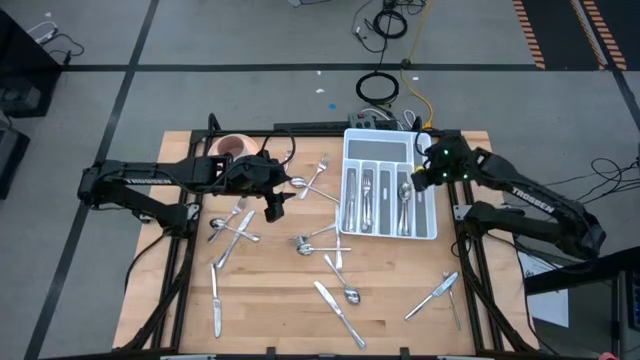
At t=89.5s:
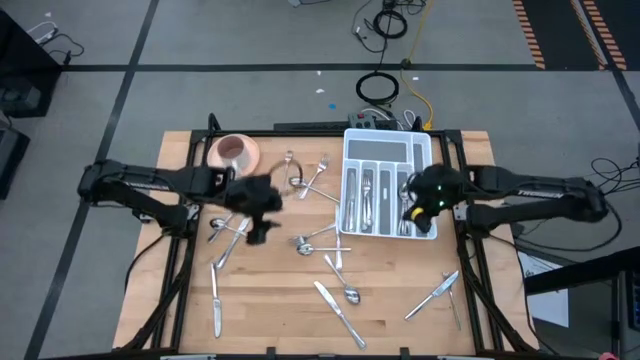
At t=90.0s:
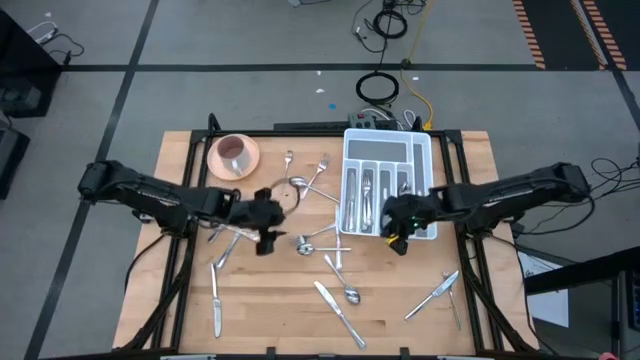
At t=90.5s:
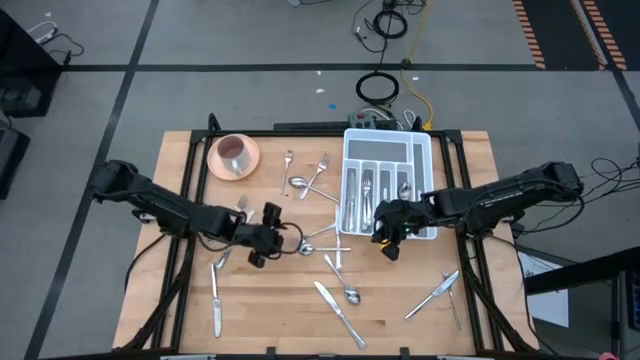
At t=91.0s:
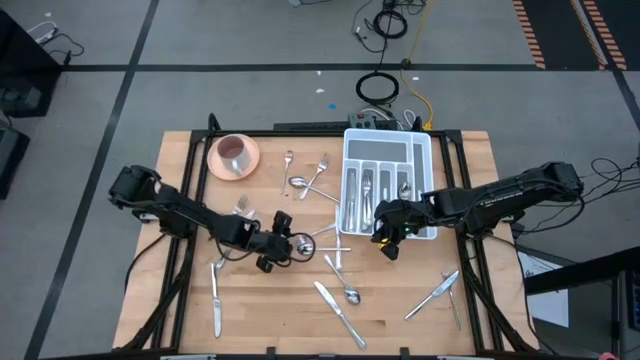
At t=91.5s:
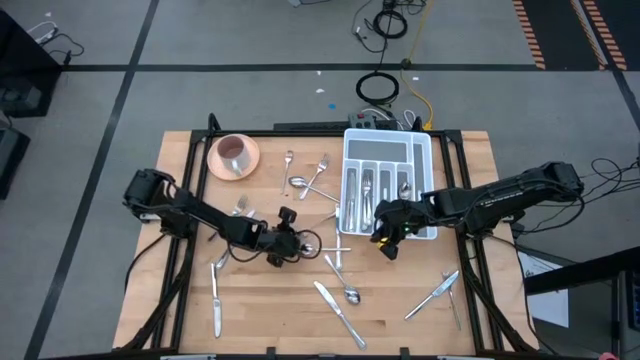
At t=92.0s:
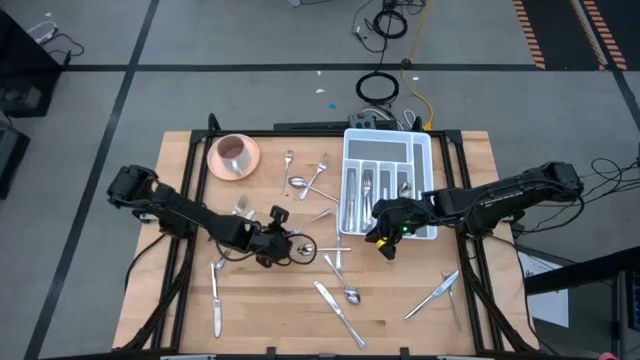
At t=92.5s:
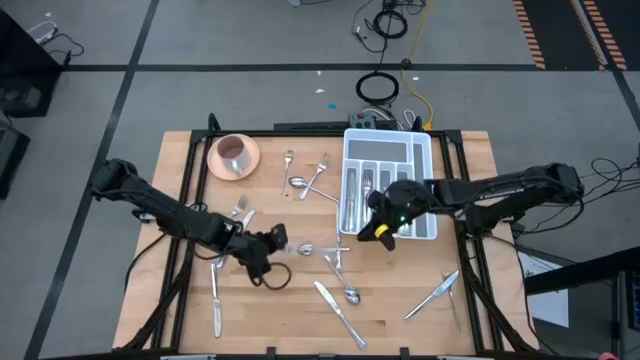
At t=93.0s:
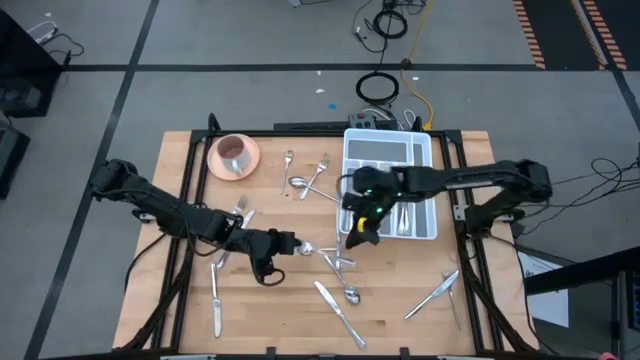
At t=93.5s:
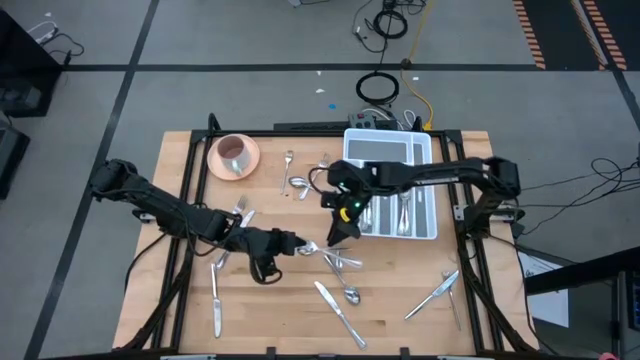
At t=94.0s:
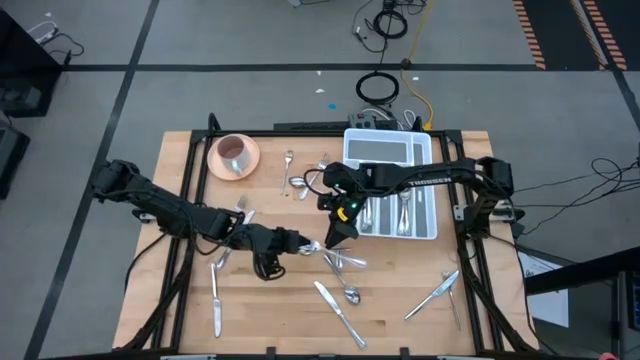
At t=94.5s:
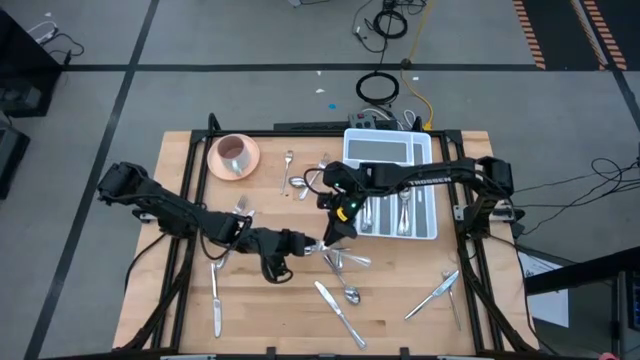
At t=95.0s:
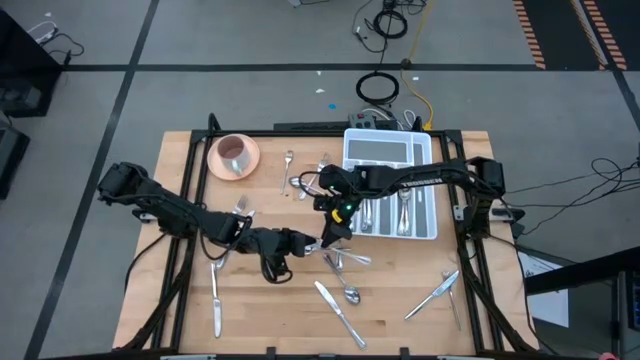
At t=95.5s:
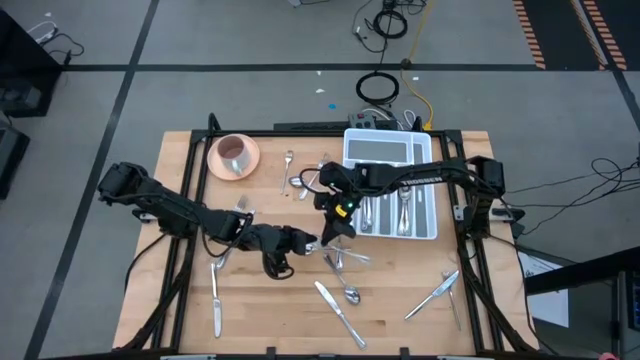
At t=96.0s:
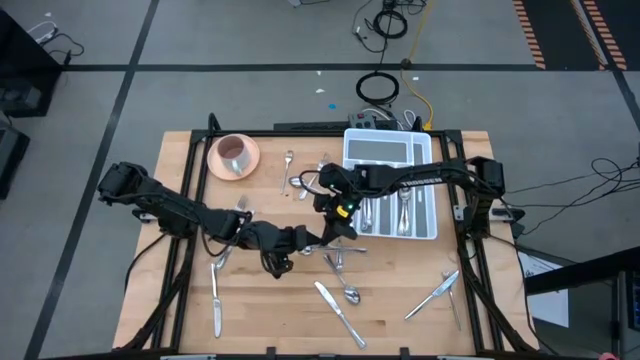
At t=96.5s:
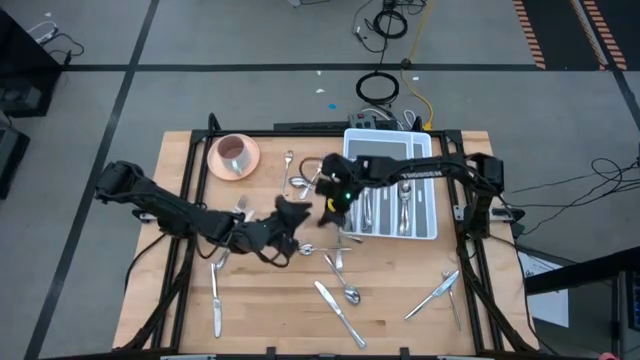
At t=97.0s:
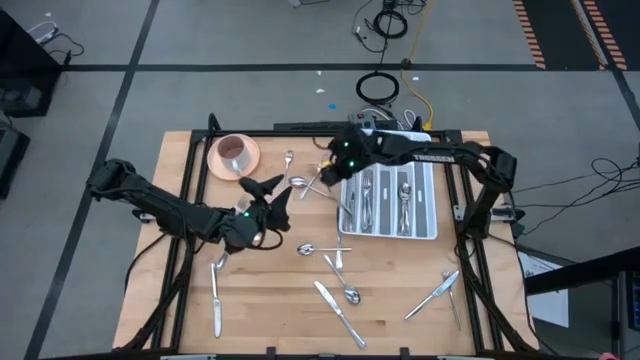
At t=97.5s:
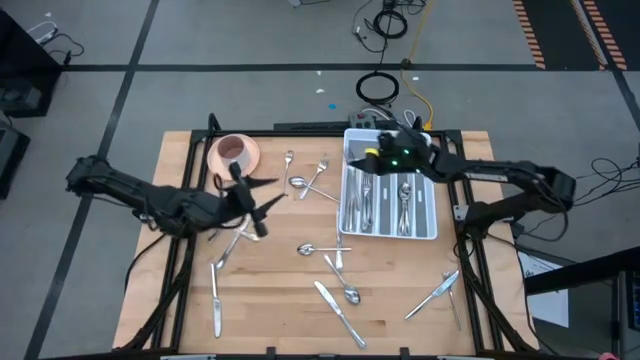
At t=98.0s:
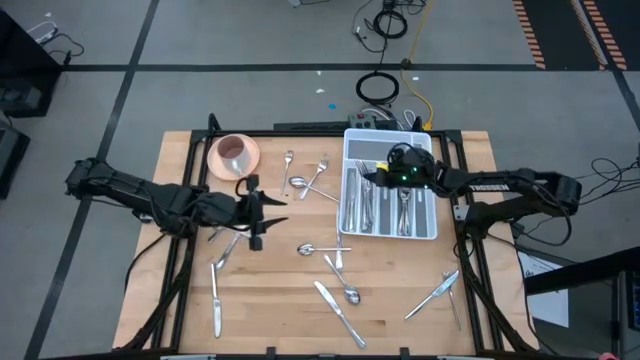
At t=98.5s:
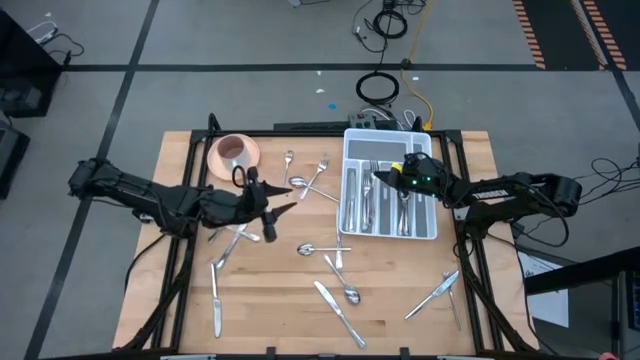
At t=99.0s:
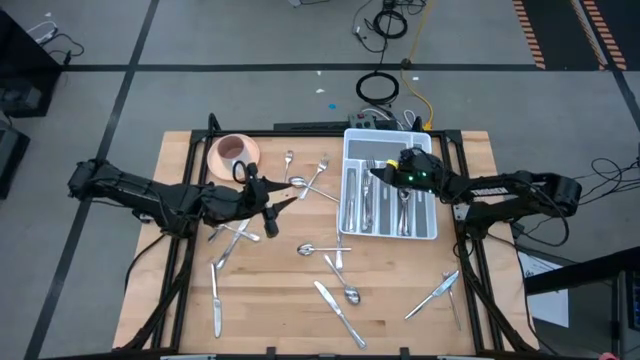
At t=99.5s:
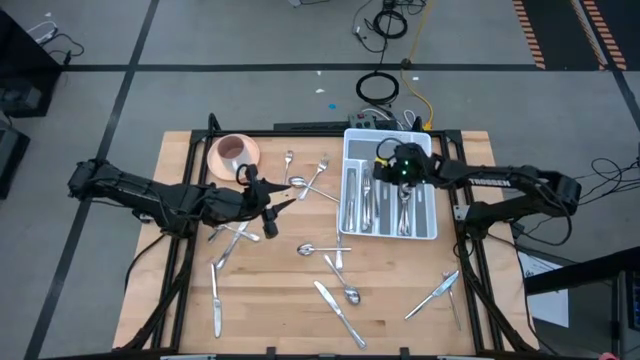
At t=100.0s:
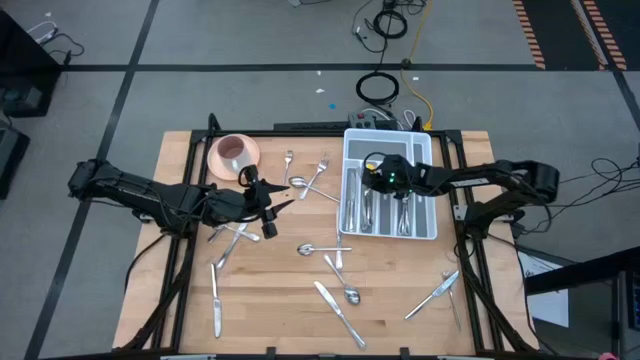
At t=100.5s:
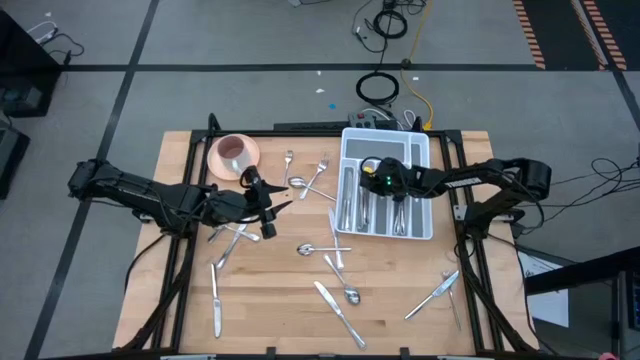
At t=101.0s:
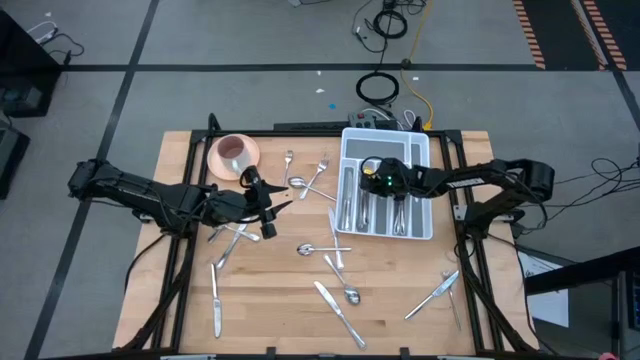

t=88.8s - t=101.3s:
Task: Sort silverware
Put the silver fork into the white silverware tray

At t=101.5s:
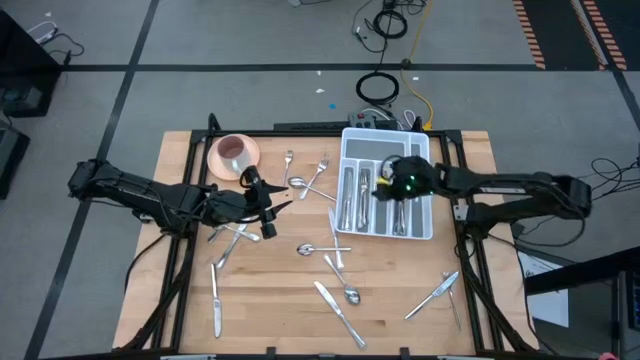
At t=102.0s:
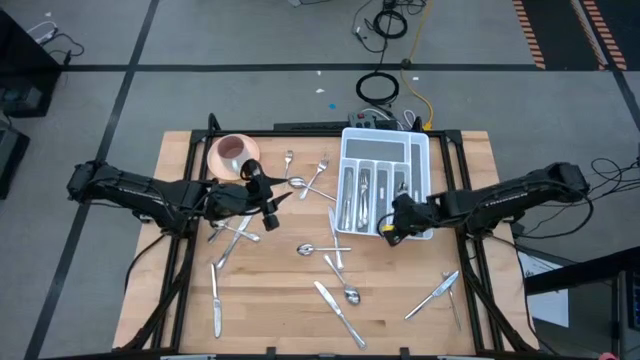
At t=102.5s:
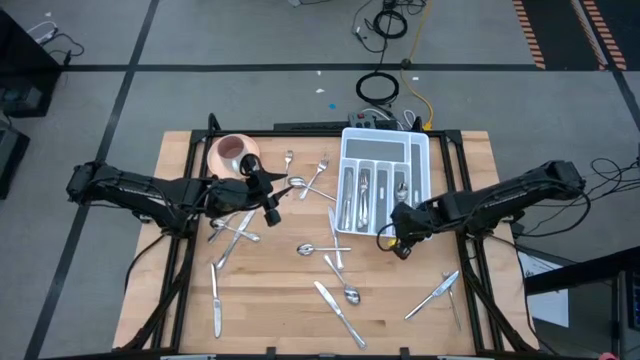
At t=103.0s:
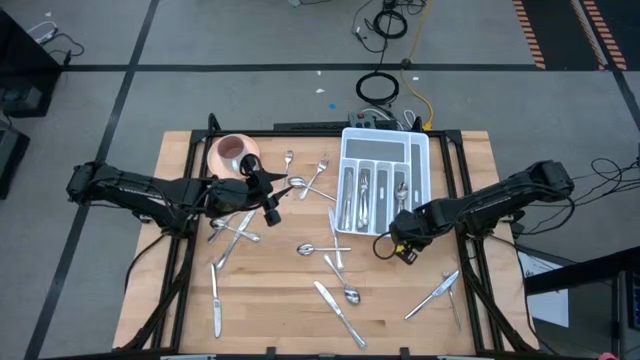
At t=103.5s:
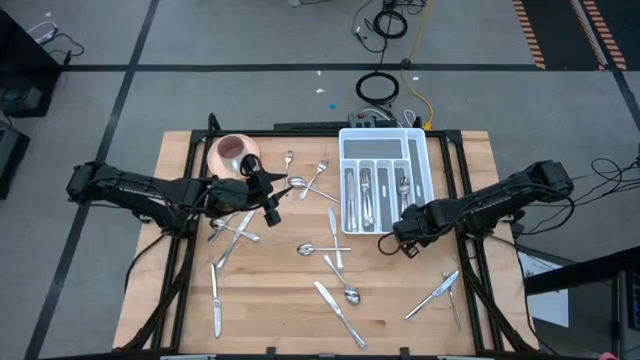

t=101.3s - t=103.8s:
Adjust the white silverware tray on the table

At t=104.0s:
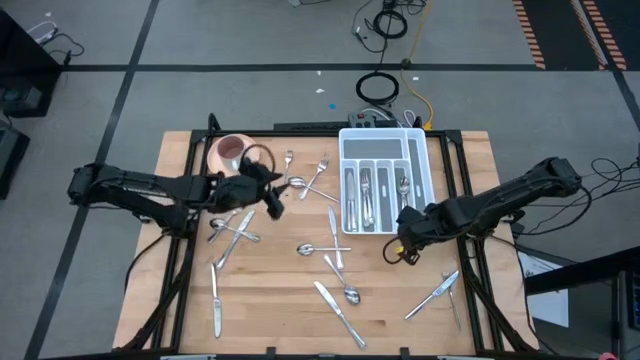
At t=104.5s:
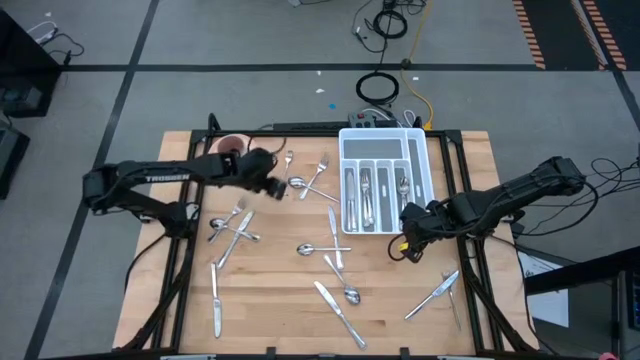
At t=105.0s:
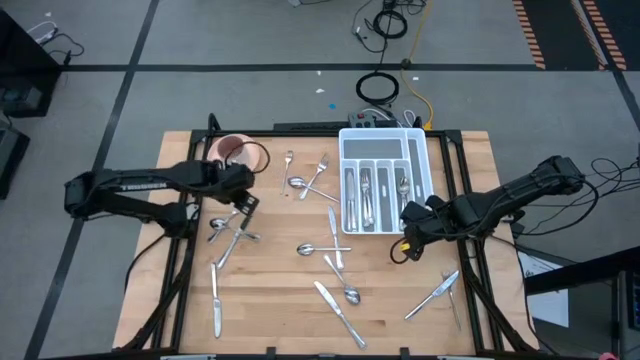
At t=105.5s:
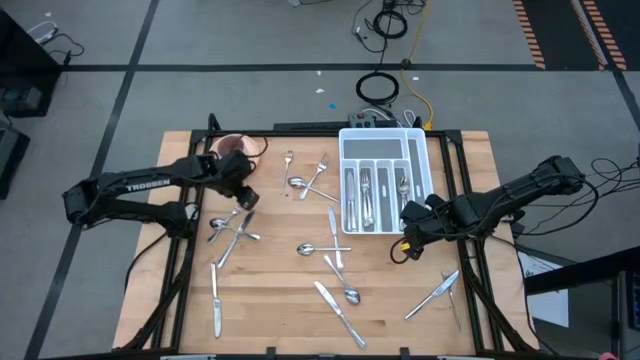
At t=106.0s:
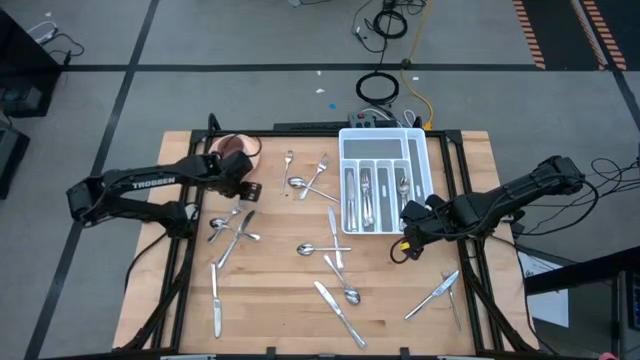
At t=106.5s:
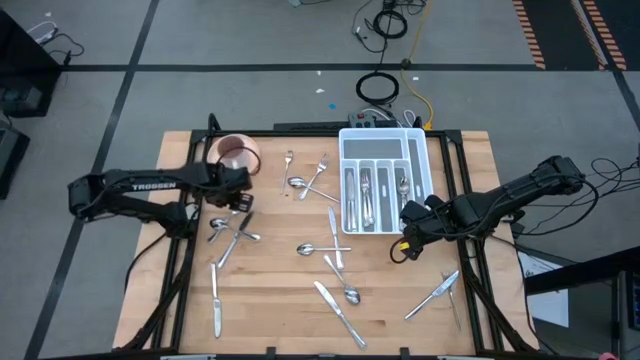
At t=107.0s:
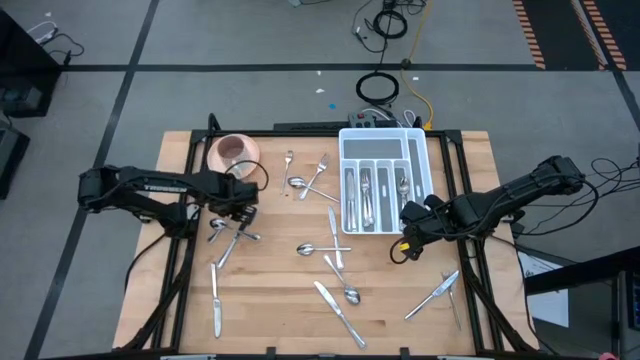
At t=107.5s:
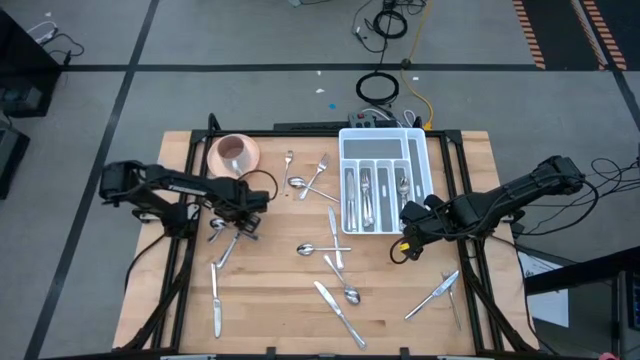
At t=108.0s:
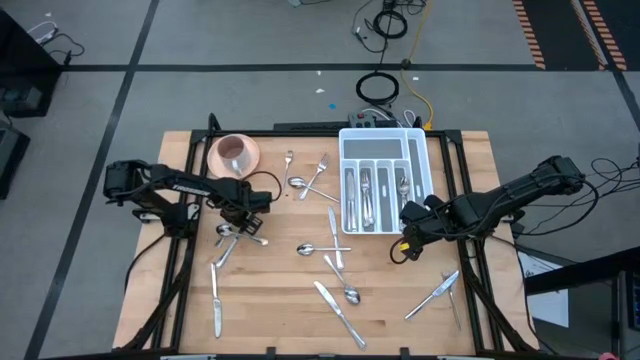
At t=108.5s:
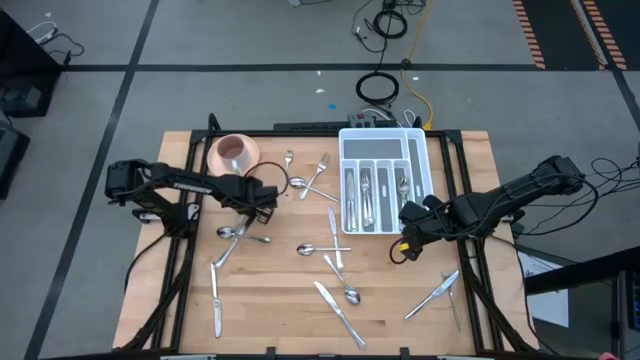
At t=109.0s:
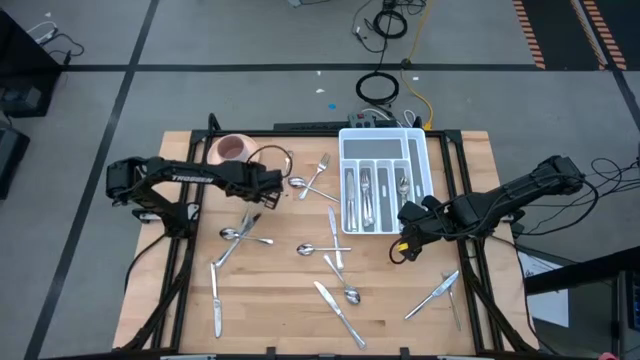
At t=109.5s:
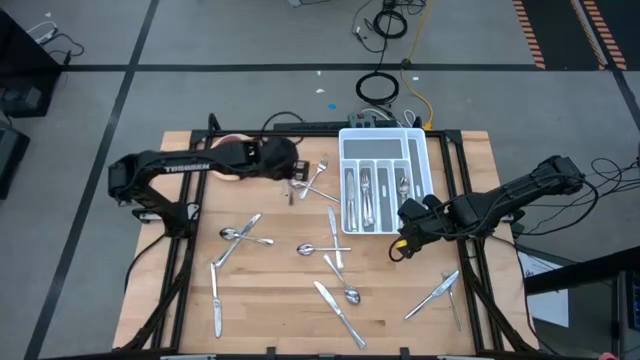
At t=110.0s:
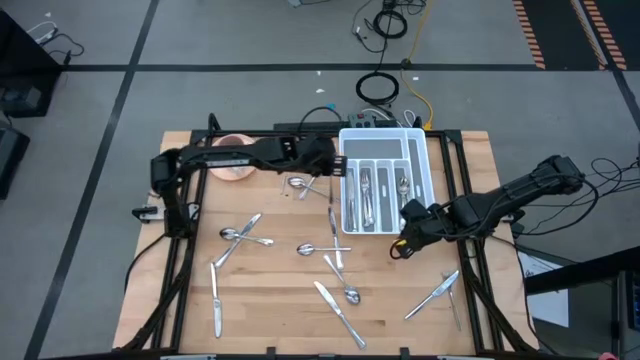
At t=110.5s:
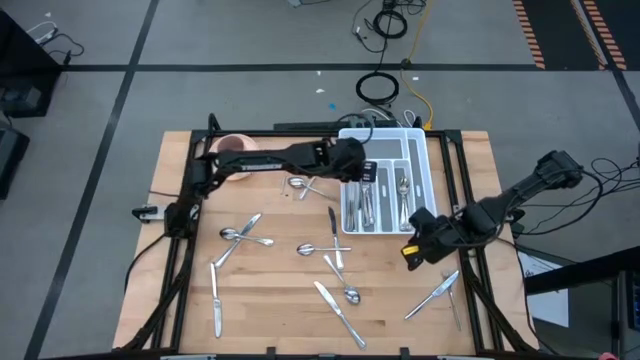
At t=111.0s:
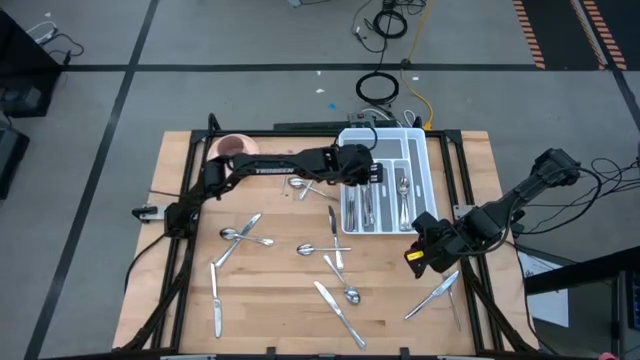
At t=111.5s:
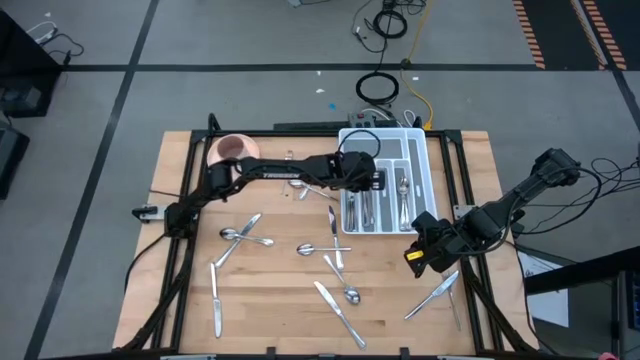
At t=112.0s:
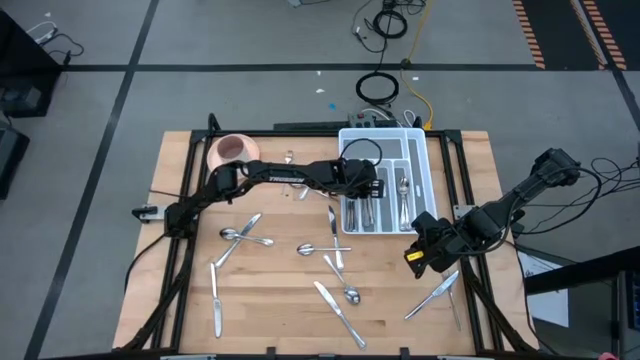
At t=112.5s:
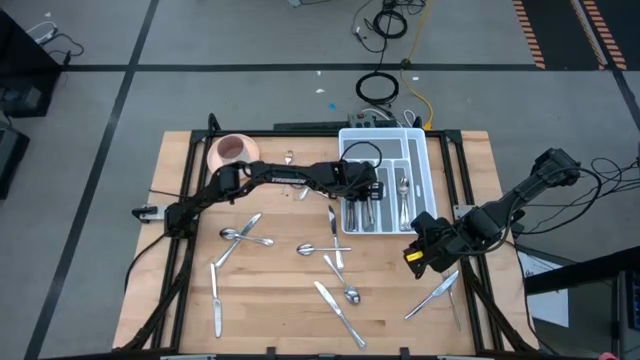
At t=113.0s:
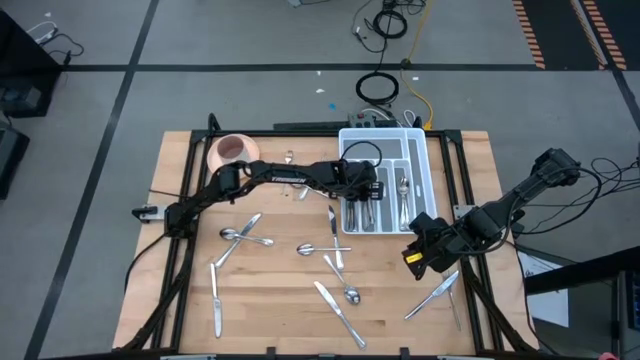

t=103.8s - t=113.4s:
Put the silver fork into the white silverware tray
